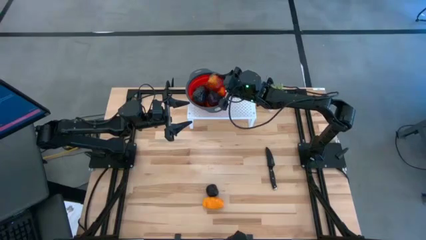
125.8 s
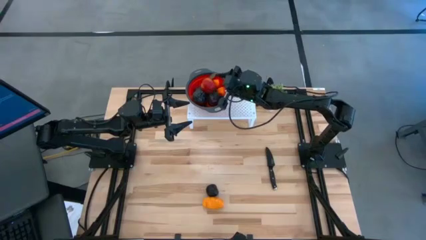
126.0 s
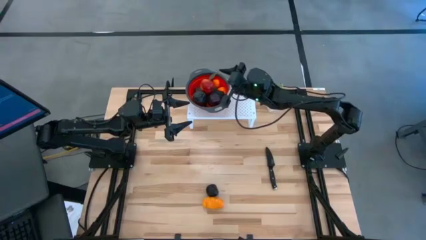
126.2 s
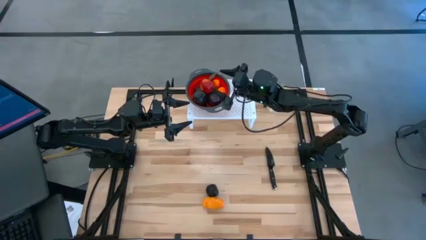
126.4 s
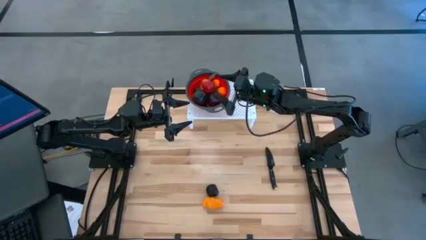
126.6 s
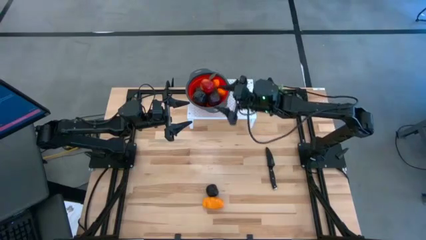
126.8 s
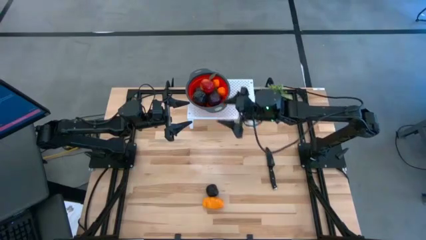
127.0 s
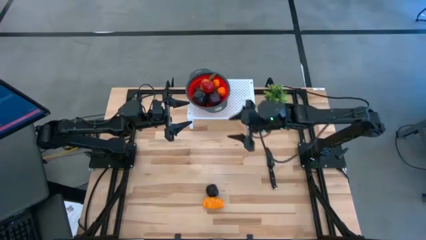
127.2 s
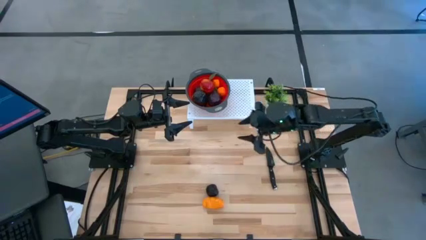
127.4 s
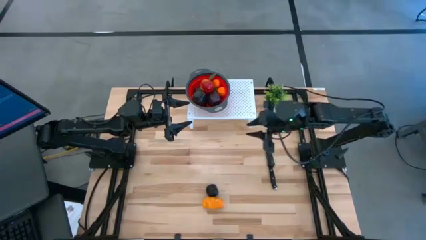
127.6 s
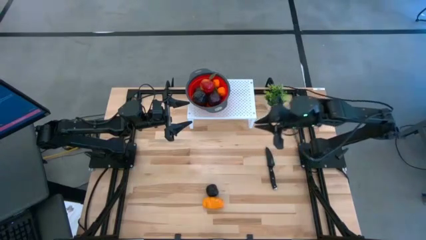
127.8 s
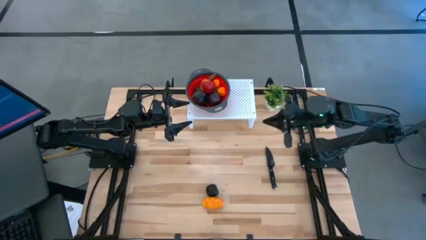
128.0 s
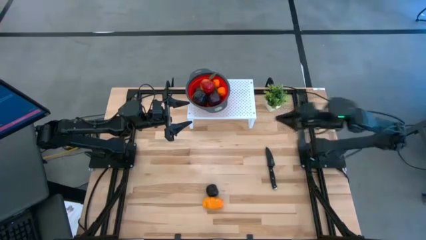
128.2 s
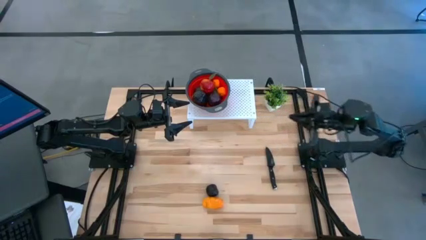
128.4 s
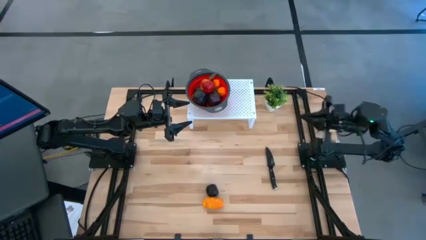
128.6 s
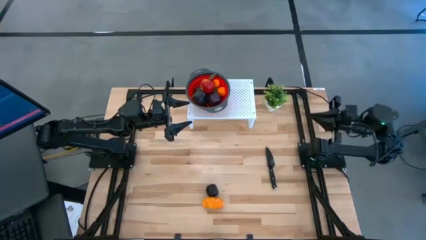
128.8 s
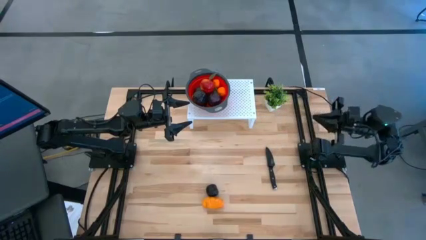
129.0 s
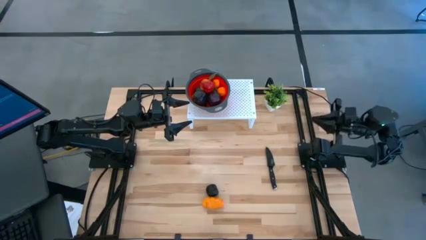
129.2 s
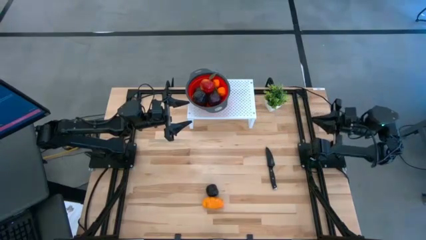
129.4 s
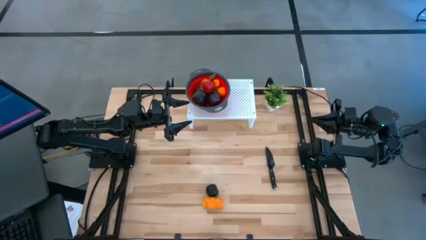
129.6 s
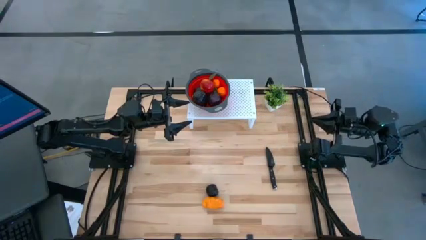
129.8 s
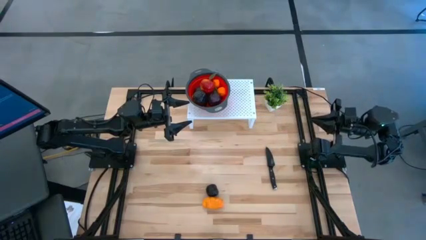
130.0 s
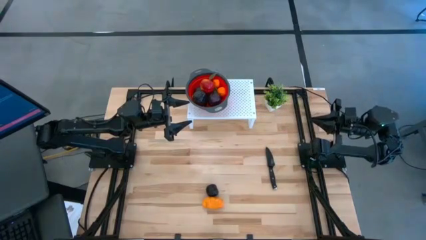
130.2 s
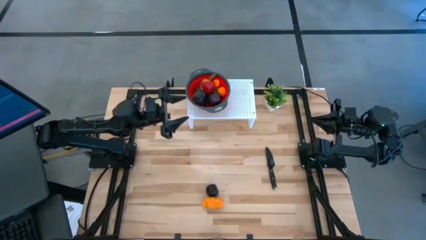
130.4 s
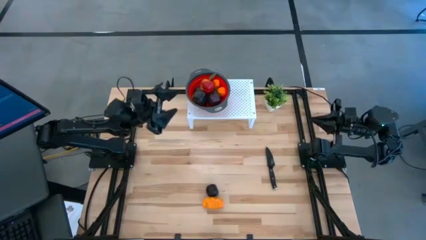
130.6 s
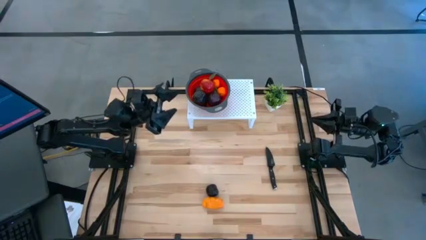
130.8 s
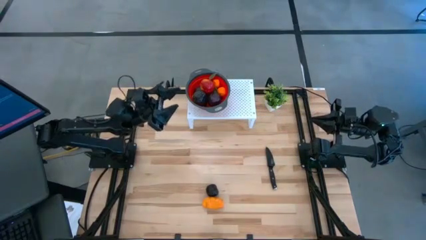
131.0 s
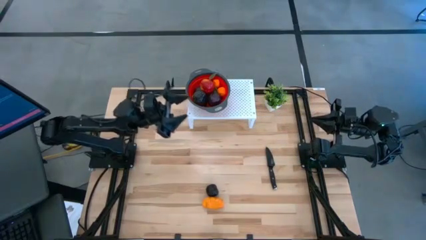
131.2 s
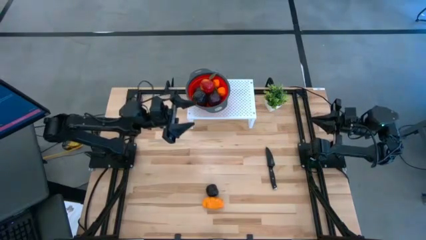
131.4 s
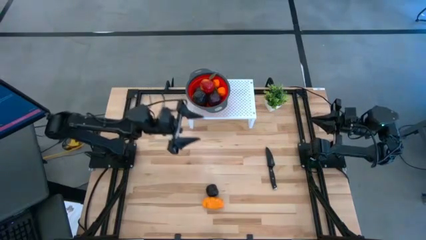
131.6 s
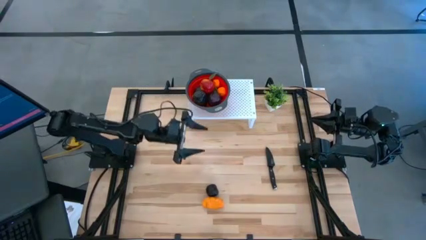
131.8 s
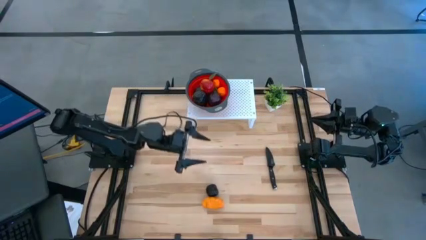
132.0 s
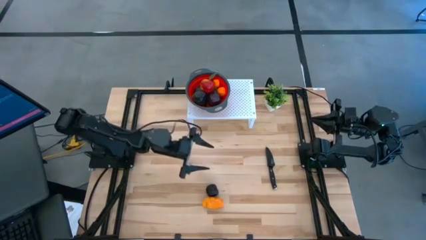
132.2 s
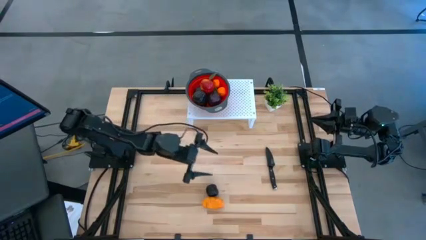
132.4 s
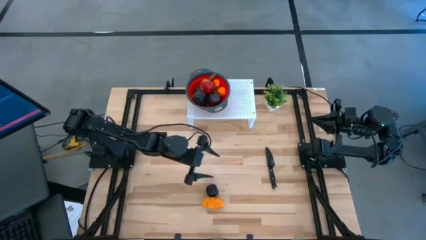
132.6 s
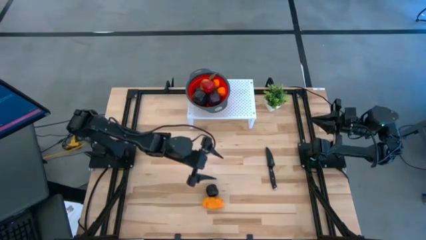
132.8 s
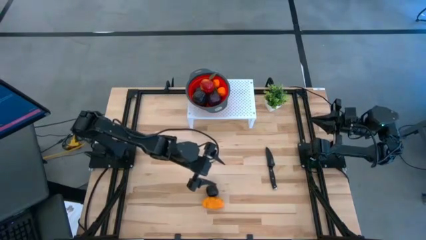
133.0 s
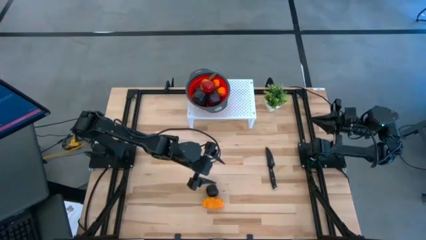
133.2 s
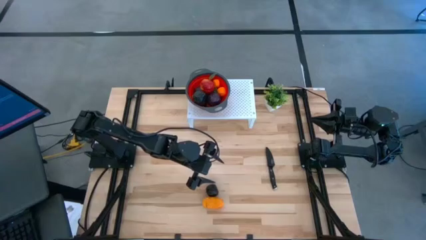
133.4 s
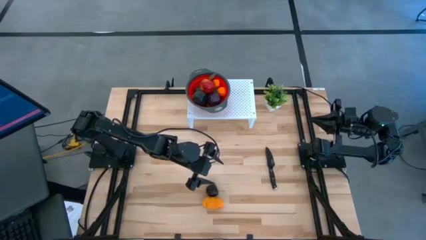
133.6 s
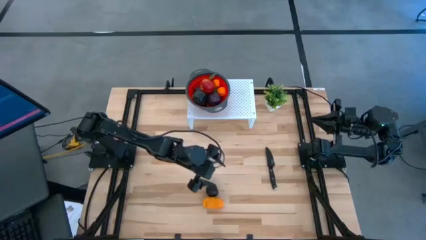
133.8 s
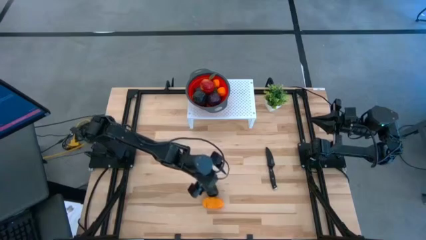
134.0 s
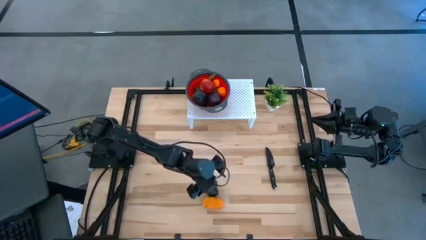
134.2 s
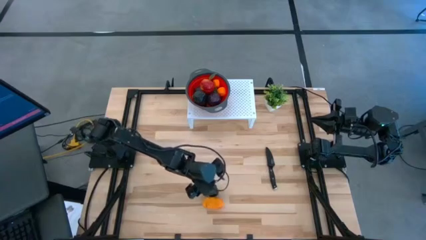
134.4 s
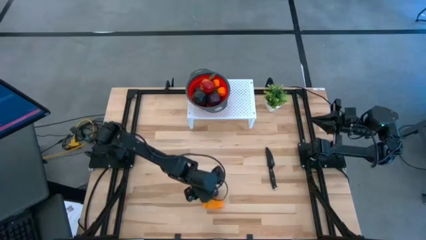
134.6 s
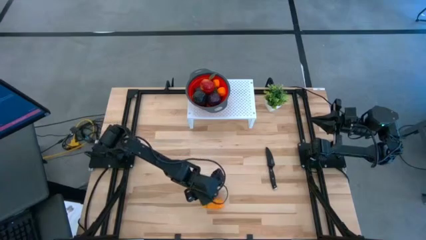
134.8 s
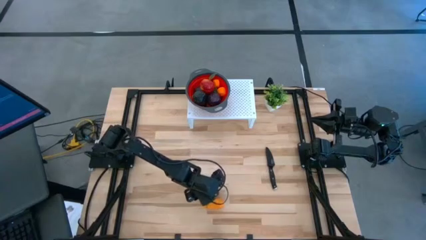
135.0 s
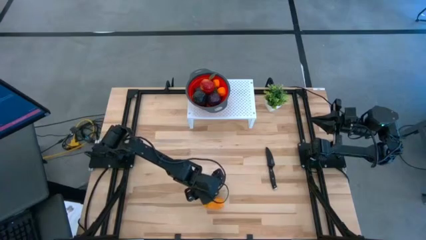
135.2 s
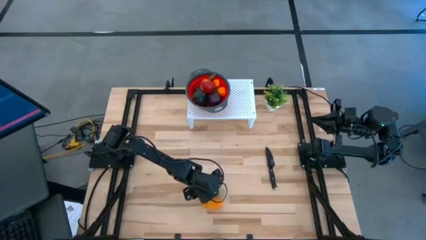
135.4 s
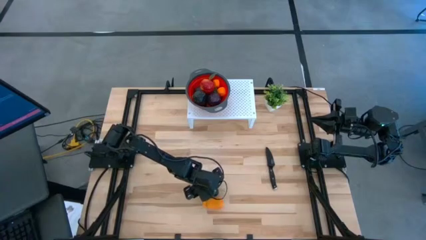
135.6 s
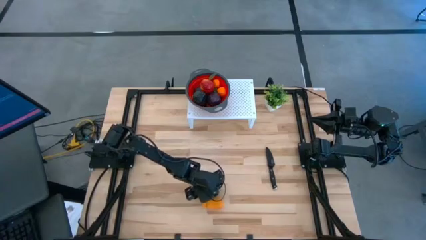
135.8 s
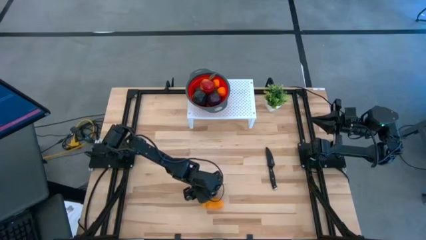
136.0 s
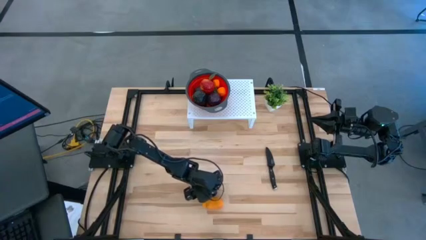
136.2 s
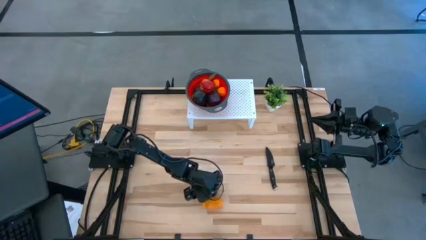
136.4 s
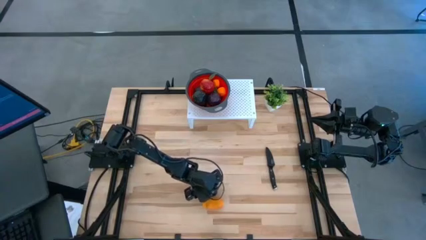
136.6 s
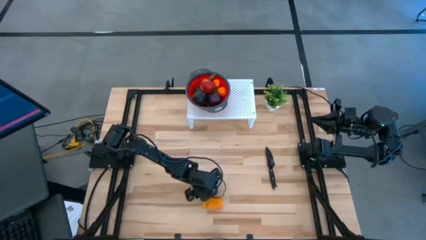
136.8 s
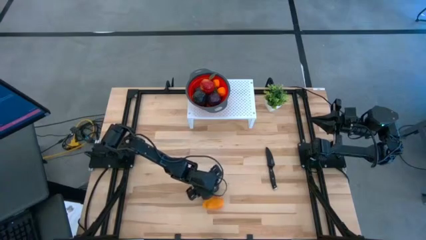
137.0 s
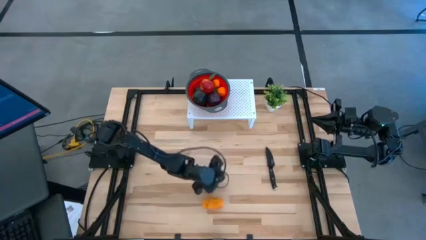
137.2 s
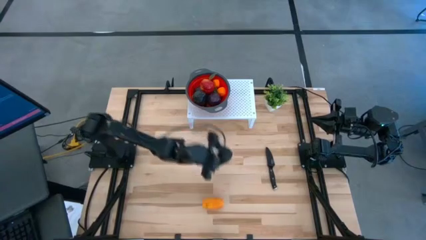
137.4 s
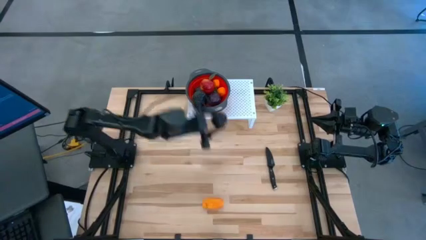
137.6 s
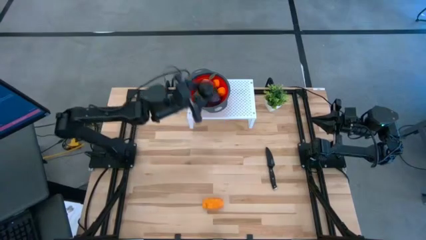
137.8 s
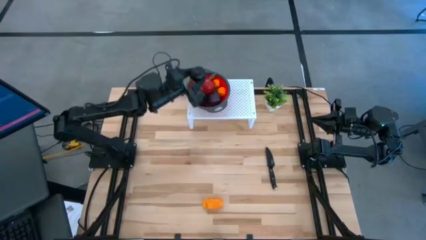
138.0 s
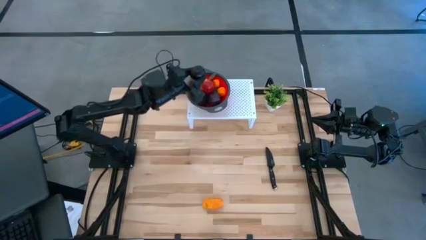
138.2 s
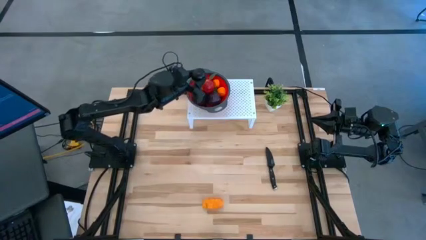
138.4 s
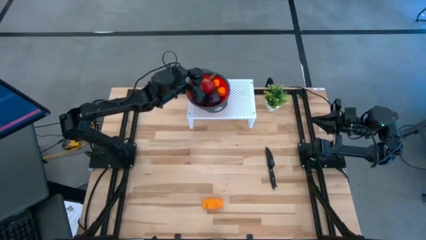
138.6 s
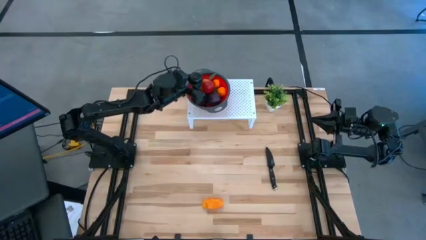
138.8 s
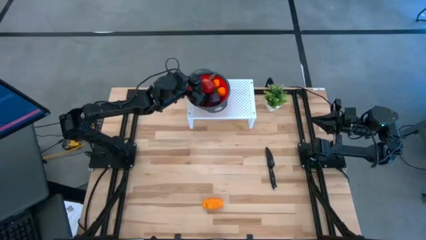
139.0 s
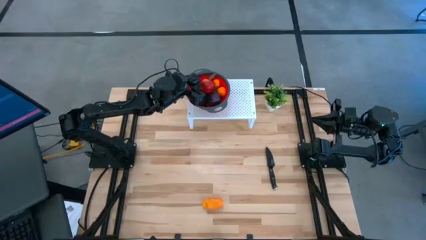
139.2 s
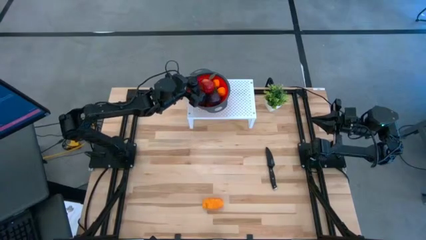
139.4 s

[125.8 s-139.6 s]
Task: Pick & Place Fruit
Put the plum into the strainer bowl on the shelf
